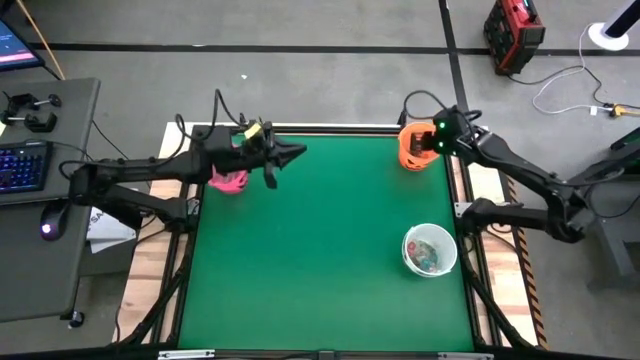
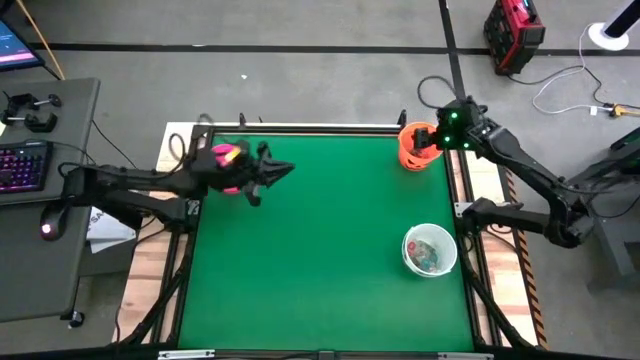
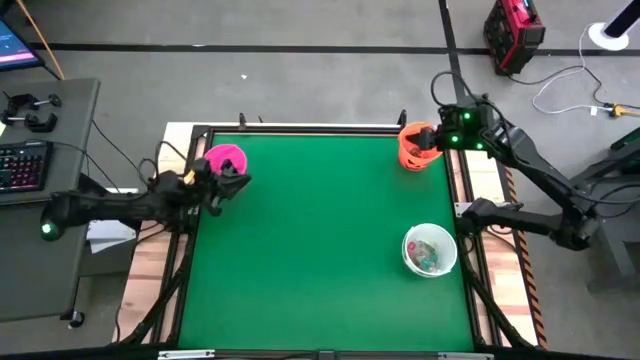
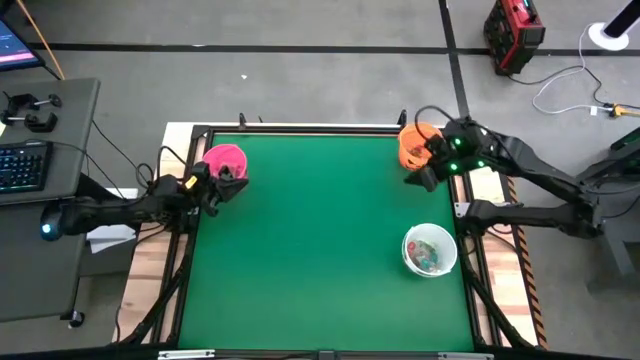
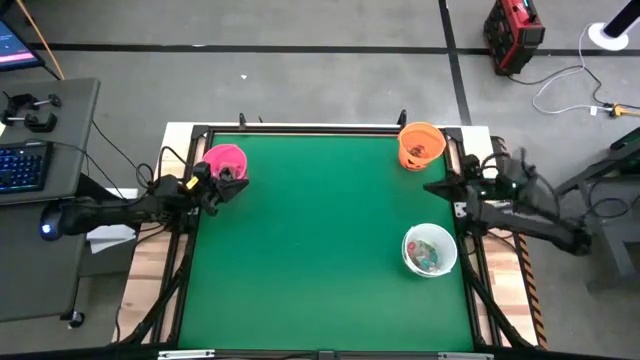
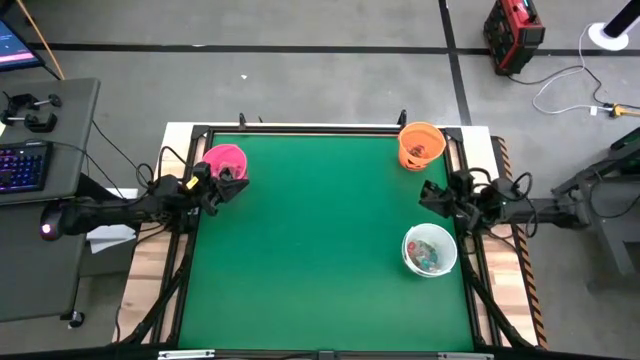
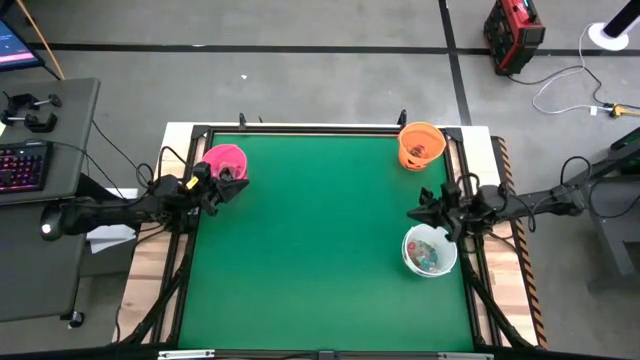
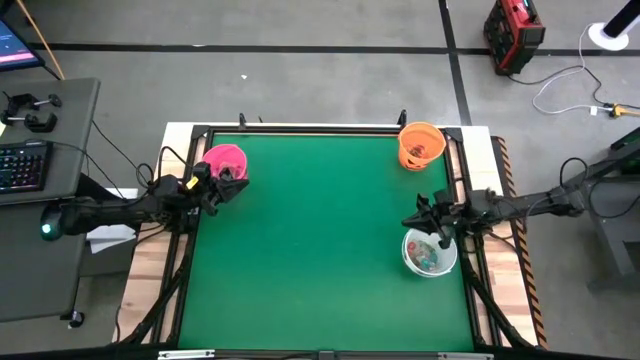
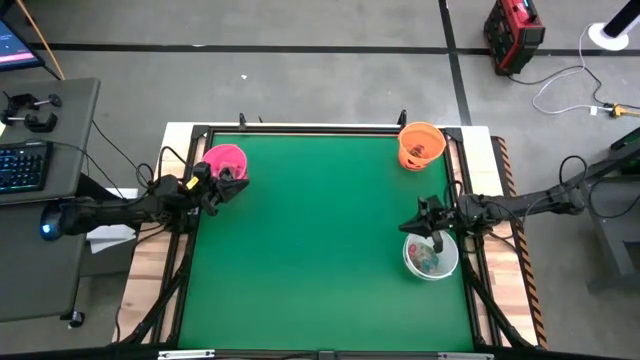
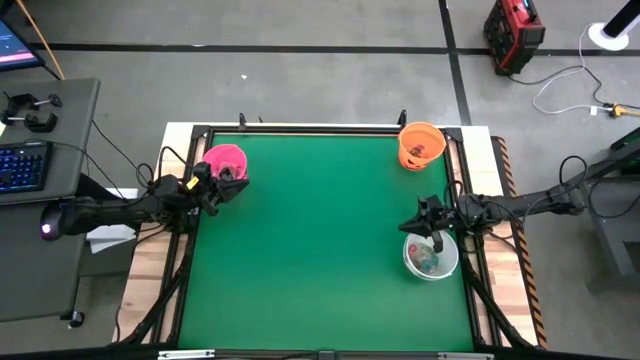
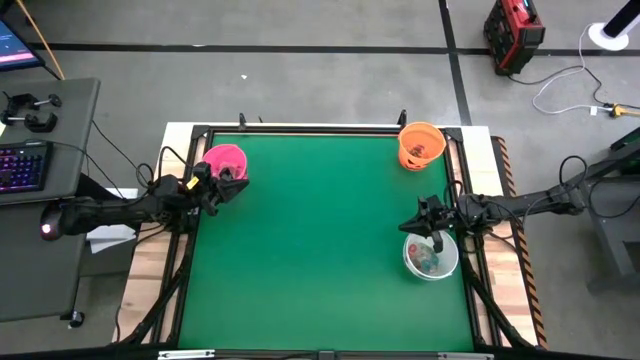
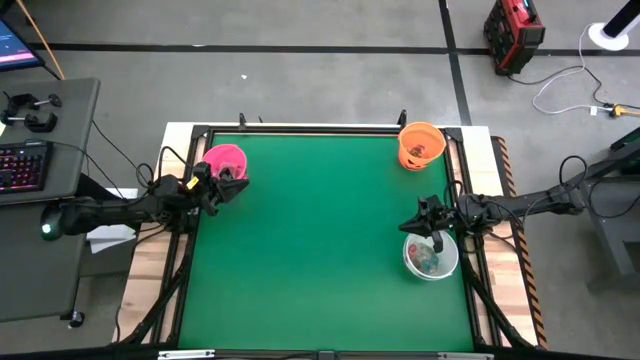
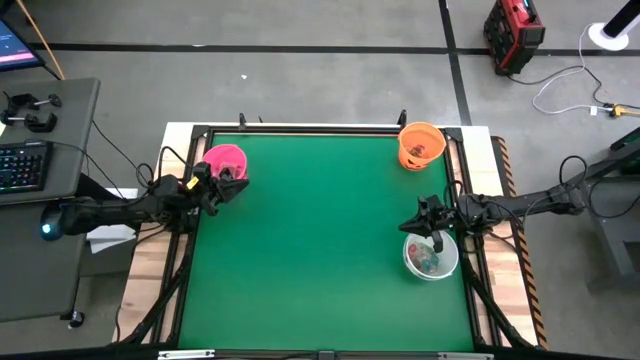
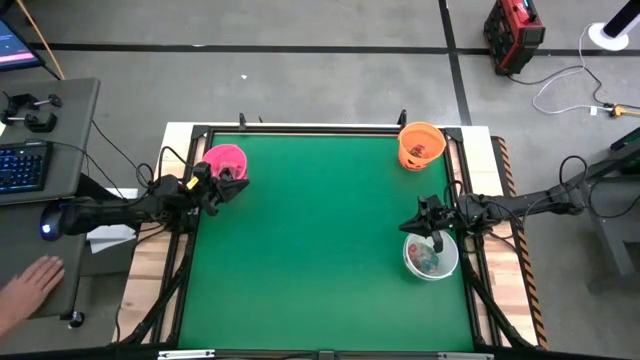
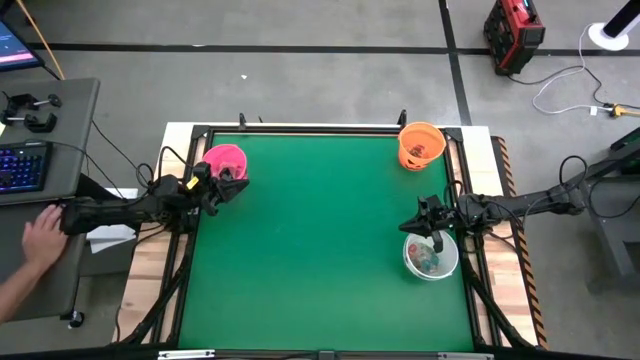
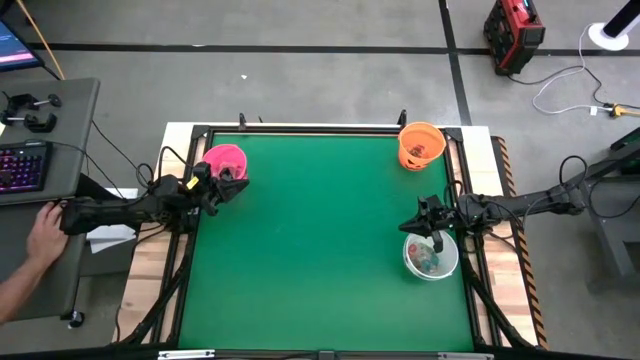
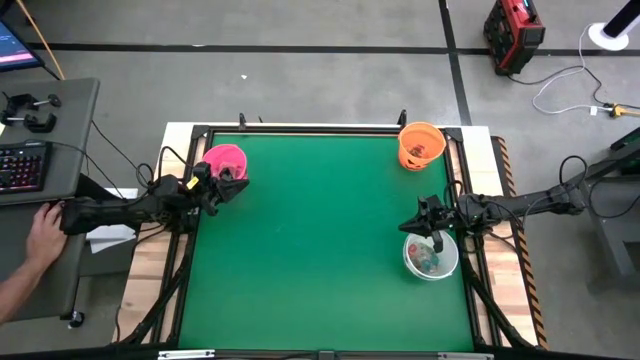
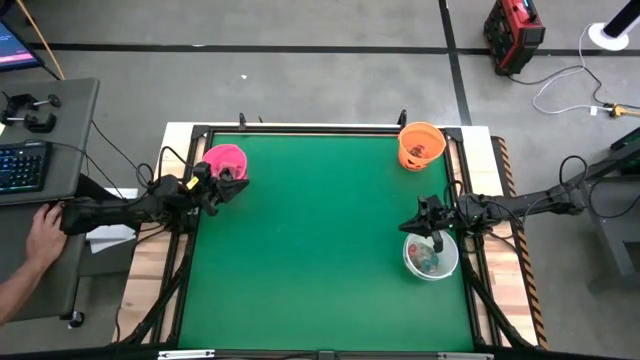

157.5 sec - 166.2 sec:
Task: Sort candy by brand, put in halloween buckets
Return to Home Position

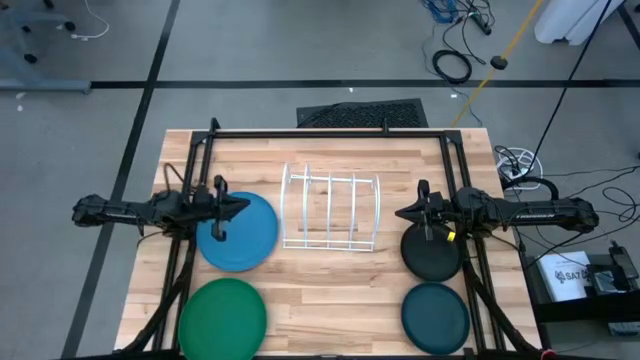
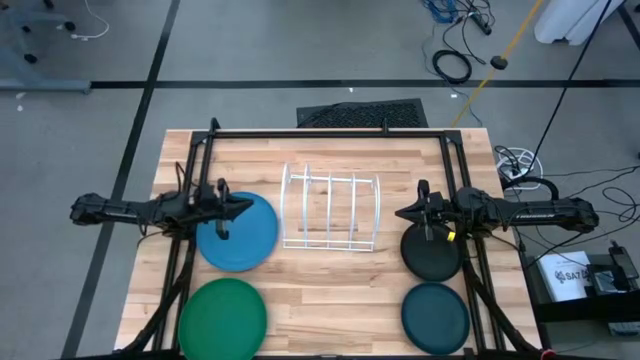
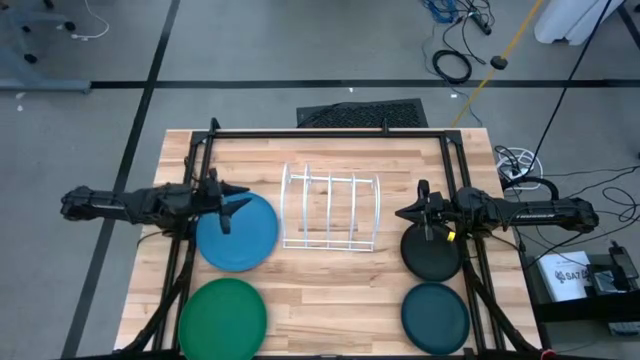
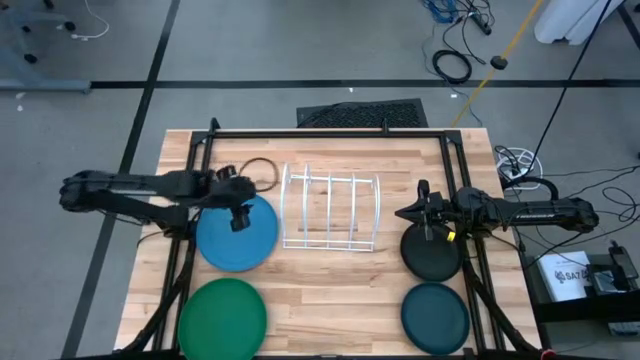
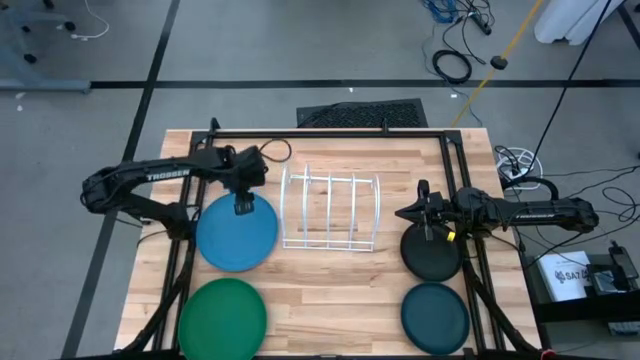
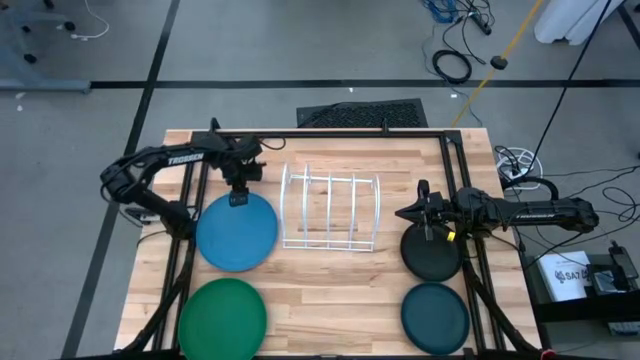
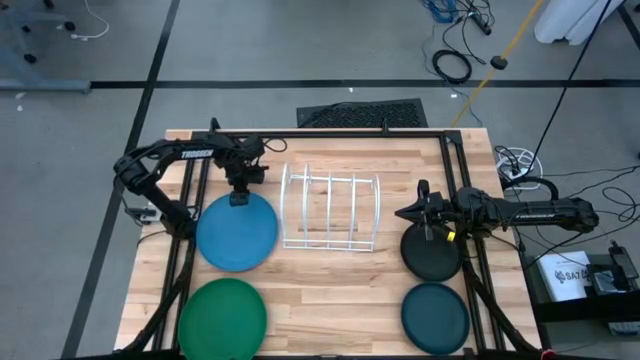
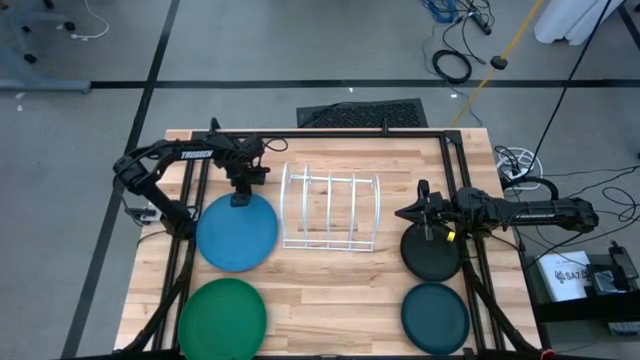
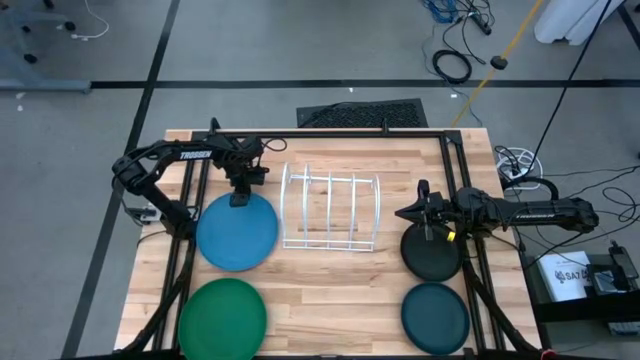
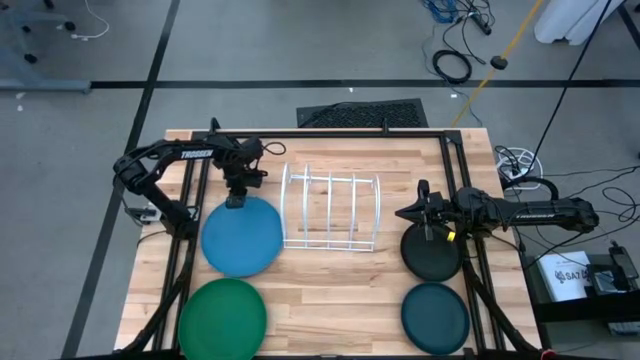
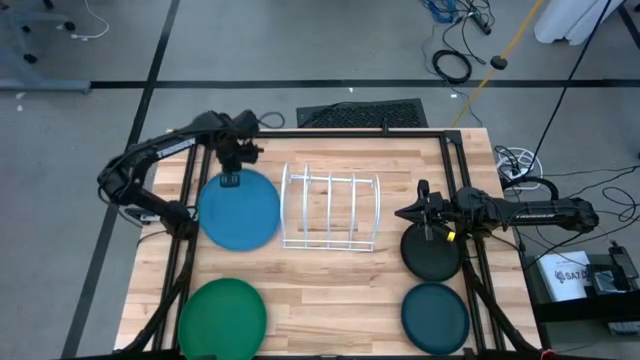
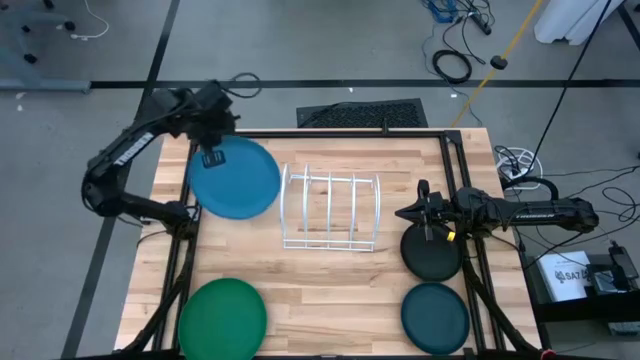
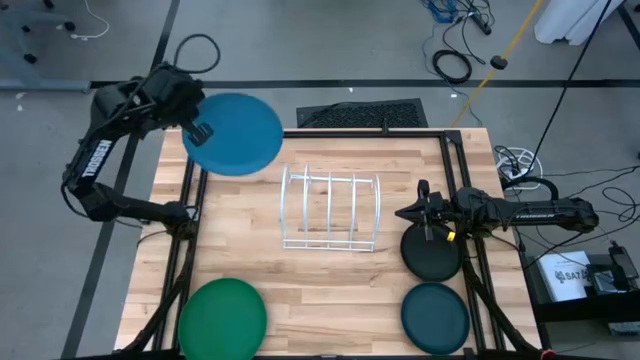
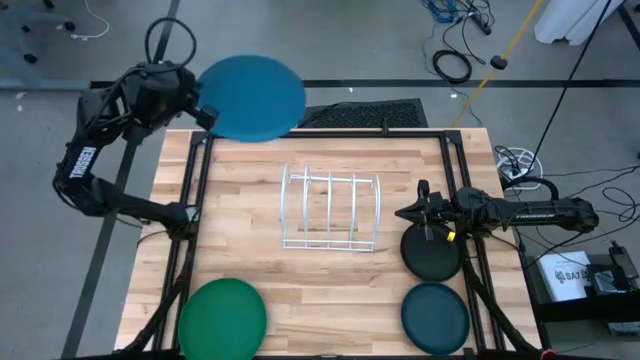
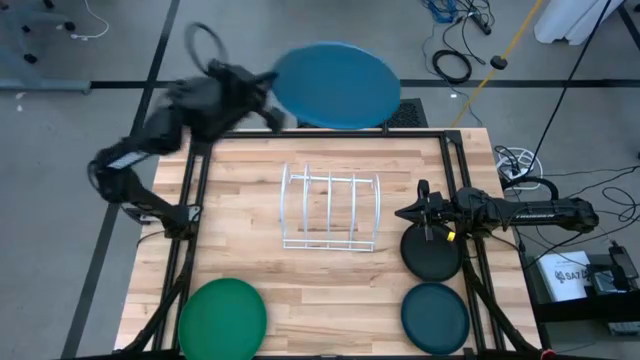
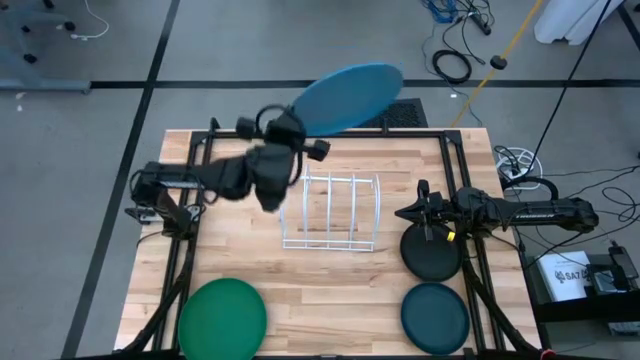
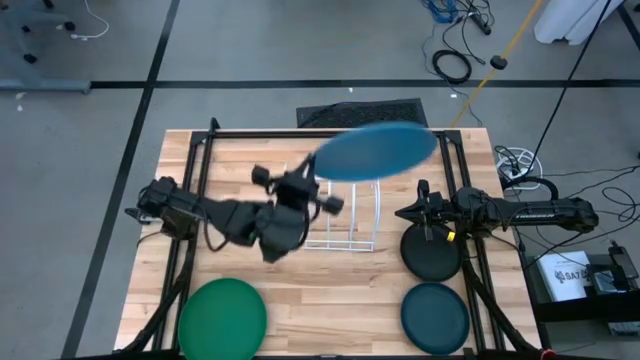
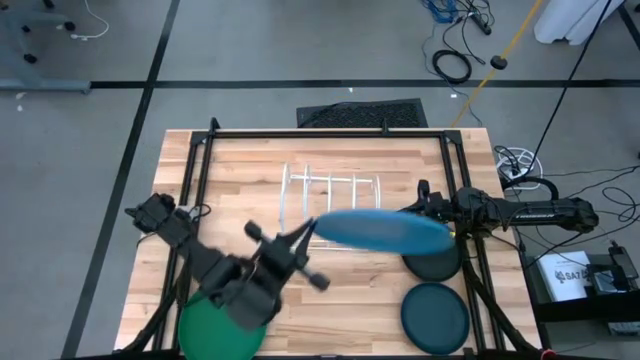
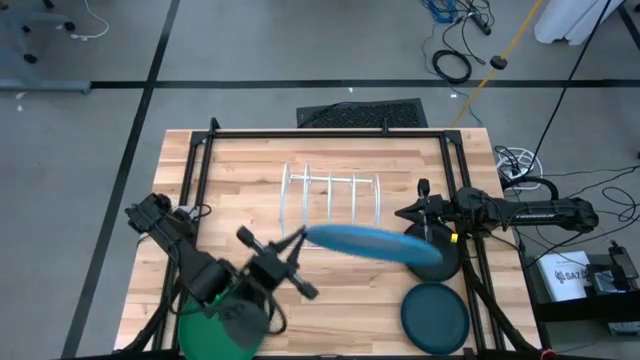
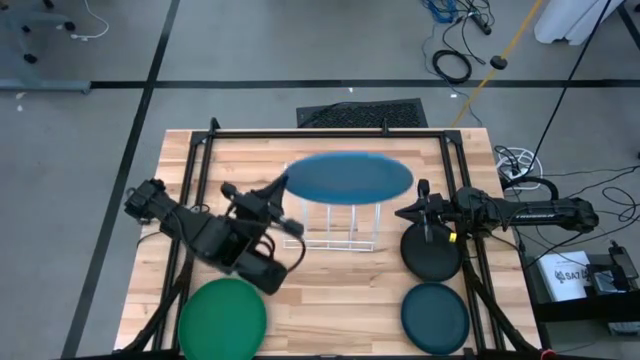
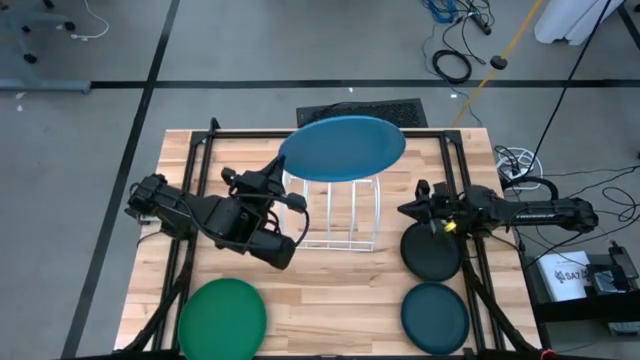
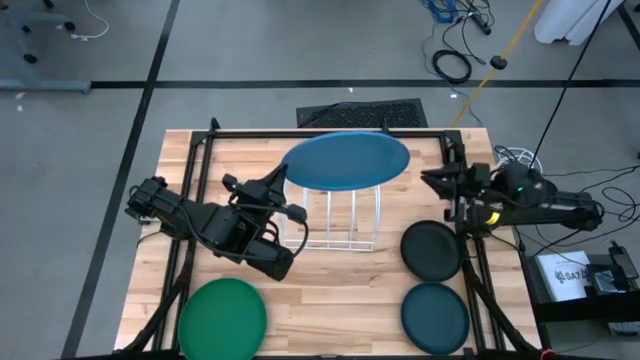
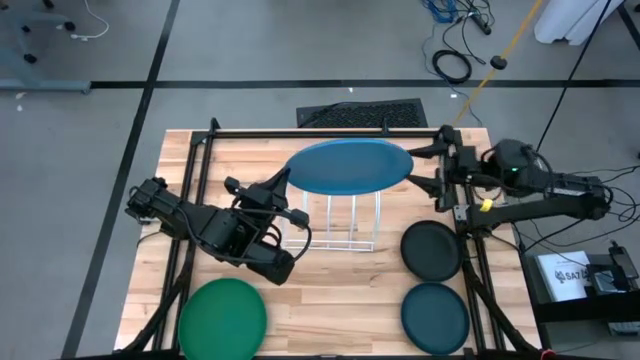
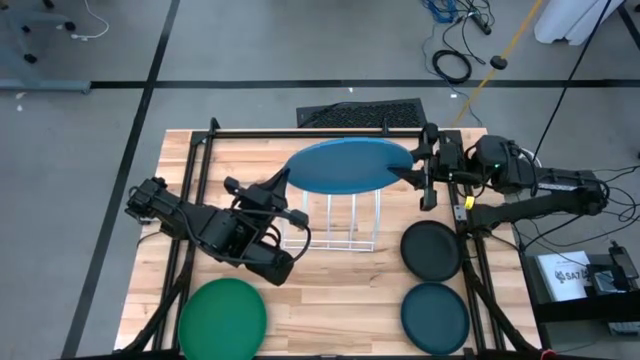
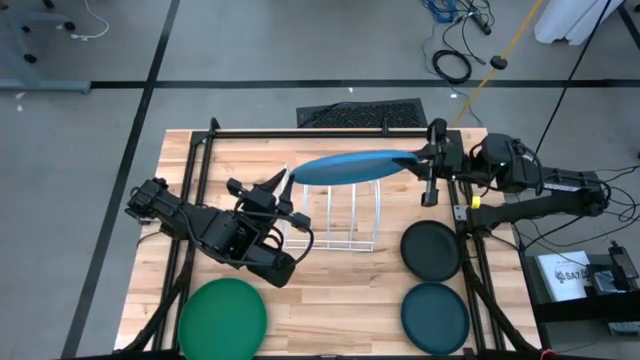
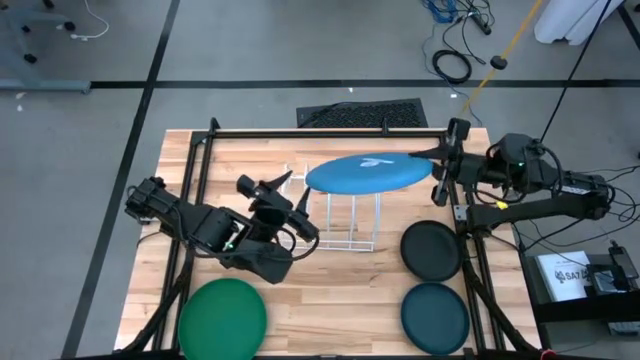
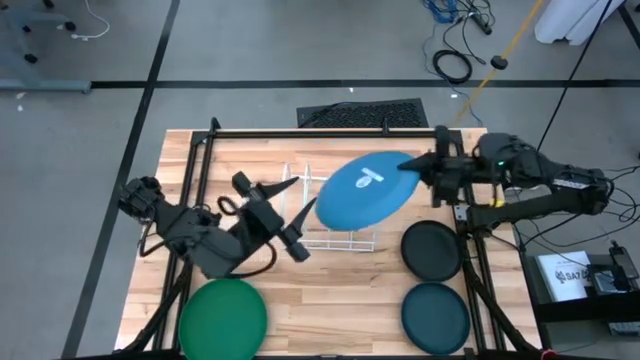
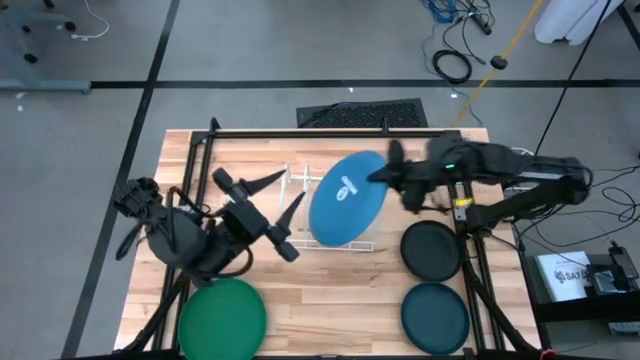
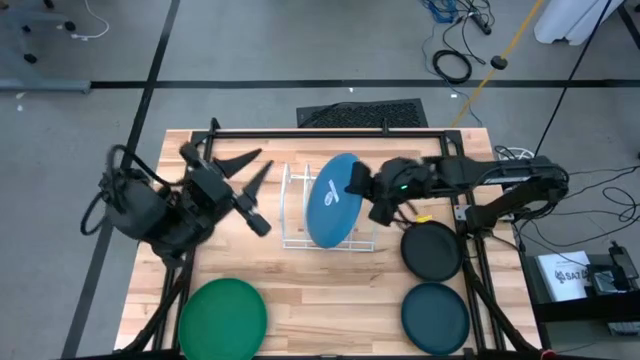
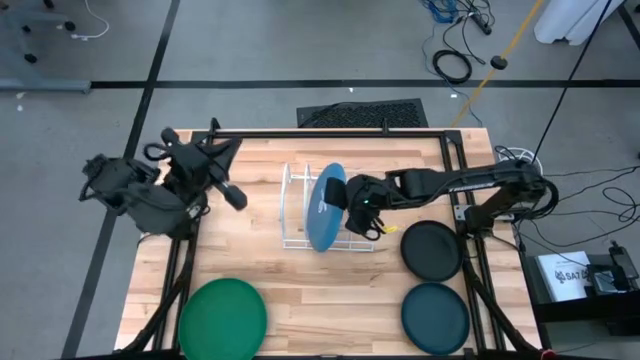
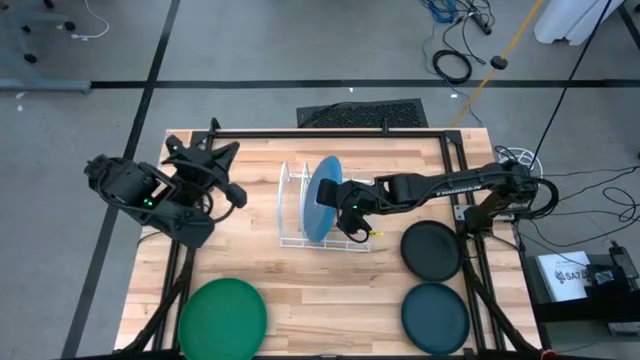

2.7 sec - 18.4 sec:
Task: Sort dishes
Put the blue plate in the dish rack
